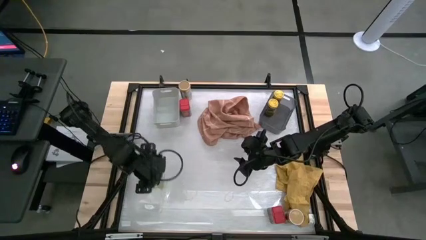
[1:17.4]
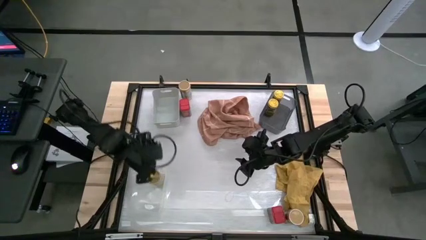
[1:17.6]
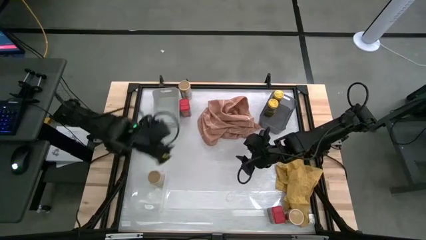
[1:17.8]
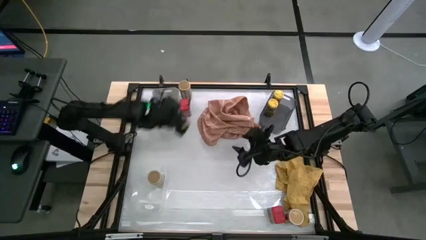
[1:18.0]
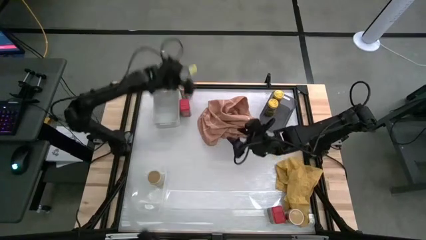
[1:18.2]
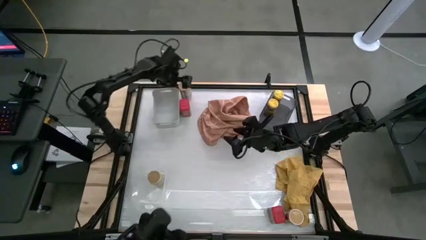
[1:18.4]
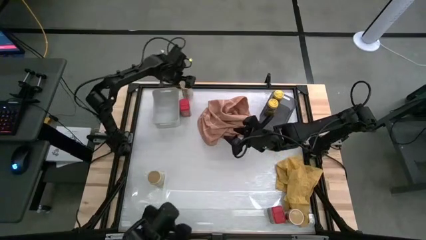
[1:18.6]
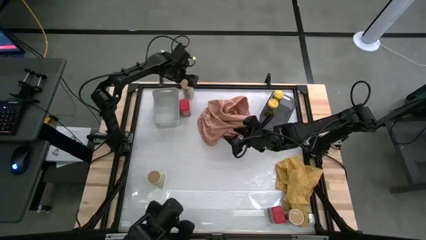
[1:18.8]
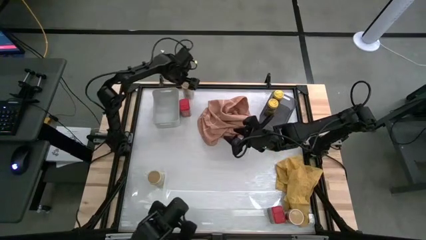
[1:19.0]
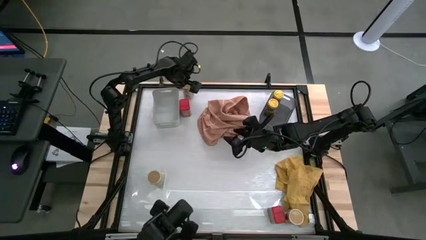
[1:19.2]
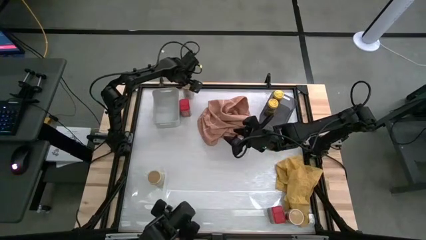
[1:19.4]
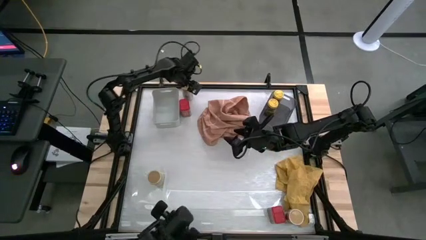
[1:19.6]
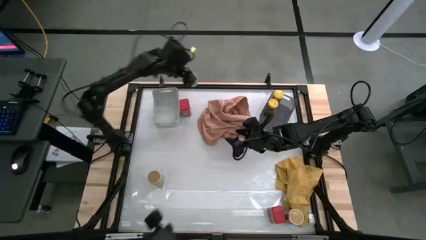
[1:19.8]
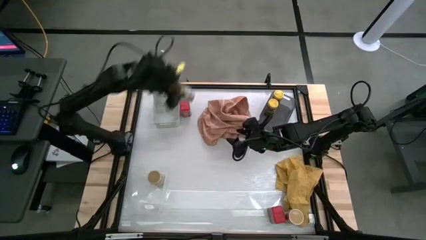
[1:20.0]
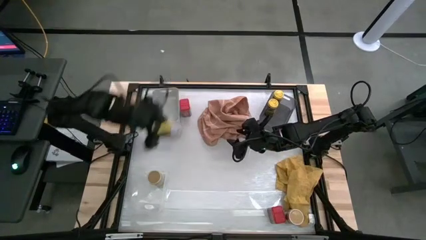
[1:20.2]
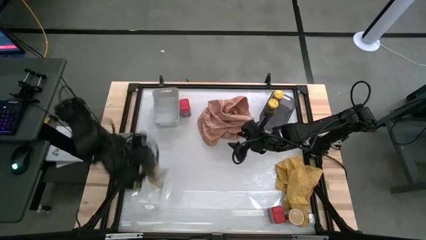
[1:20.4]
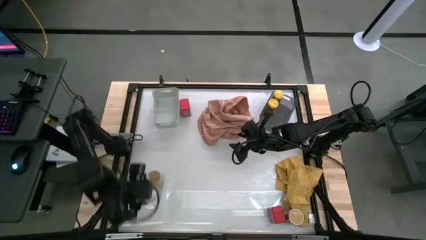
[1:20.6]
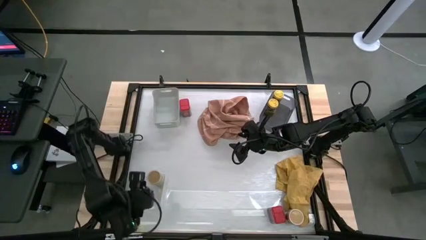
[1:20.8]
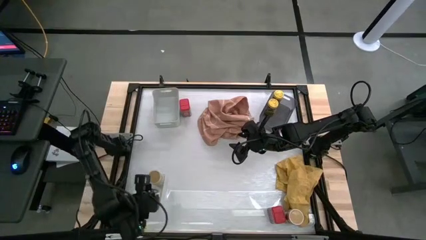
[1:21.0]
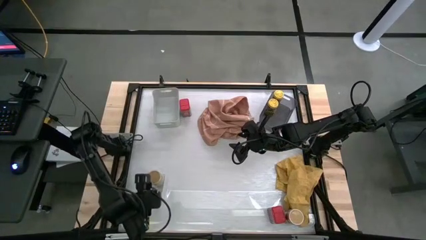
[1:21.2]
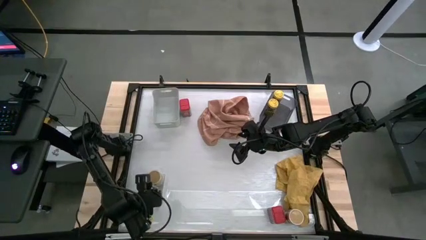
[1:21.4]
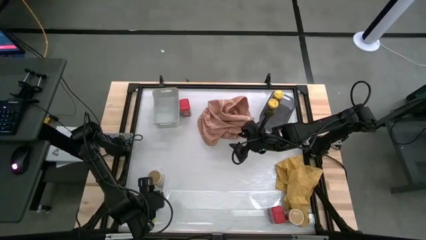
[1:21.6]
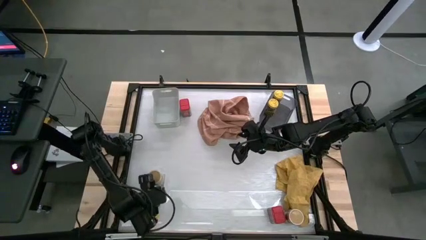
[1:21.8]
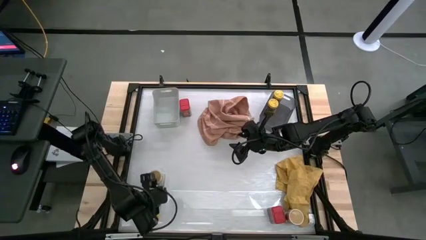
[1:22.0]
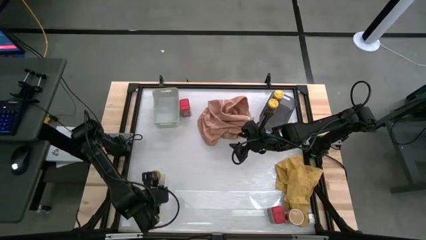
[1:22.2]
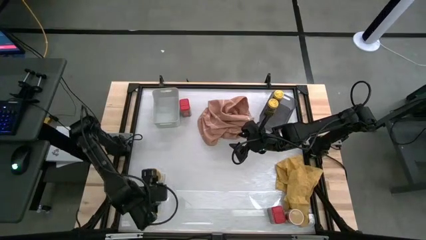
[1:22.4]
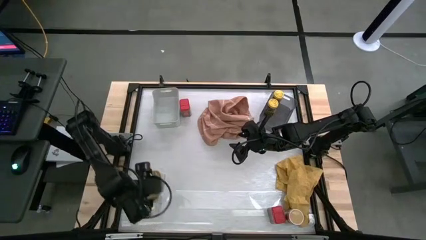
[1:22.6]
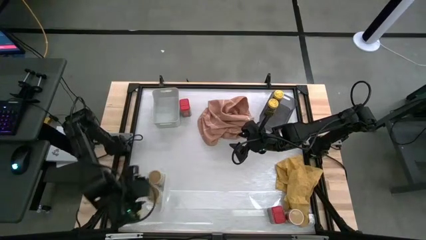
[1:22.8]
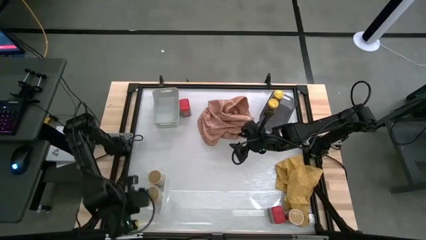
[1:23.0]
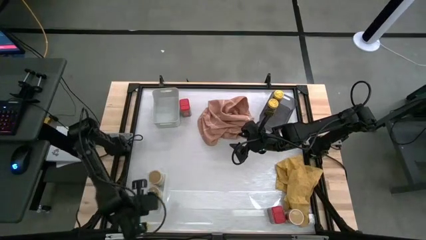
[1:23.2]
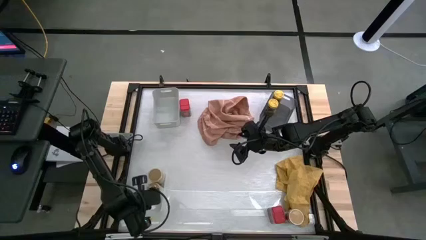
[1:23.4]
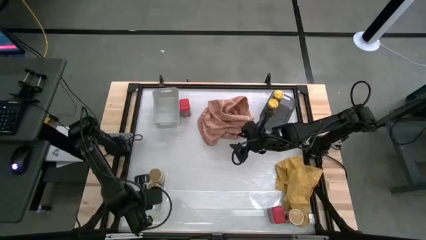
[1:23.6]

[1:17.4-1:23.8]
Task: Sort spices by type
Put the top gold seasoning bottle into the transparent bin

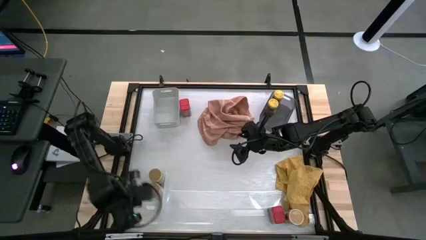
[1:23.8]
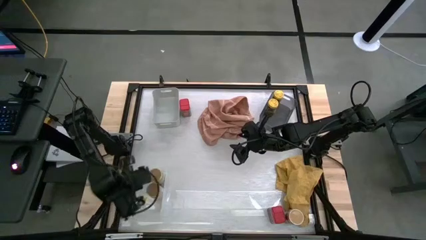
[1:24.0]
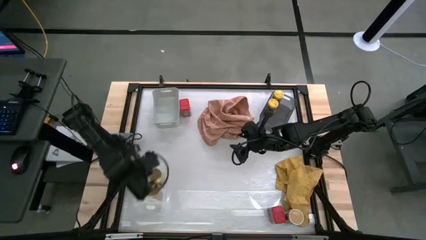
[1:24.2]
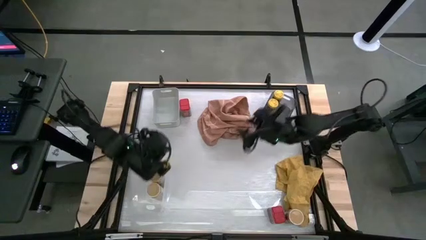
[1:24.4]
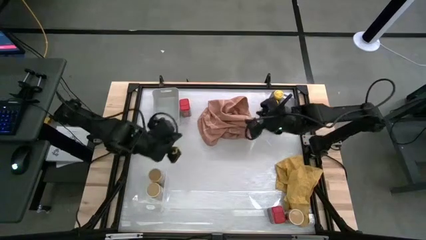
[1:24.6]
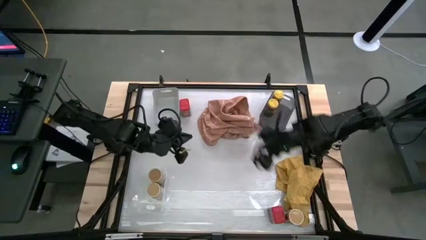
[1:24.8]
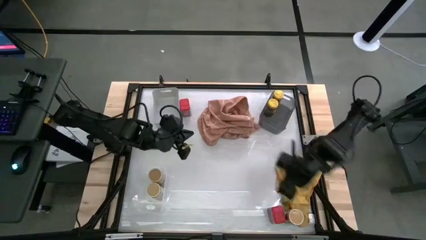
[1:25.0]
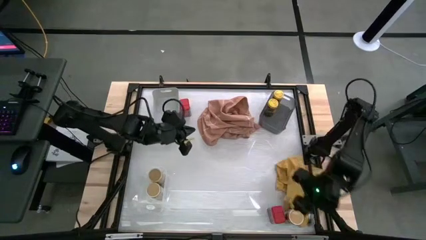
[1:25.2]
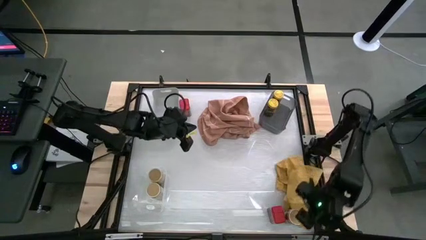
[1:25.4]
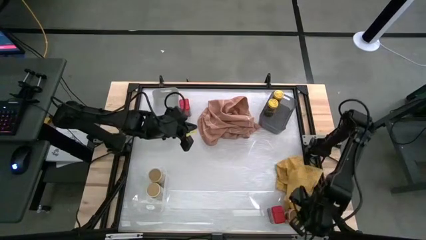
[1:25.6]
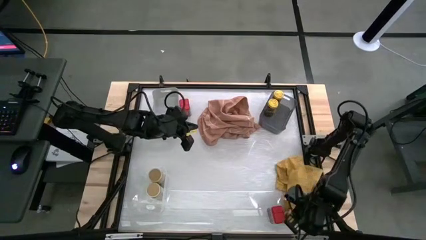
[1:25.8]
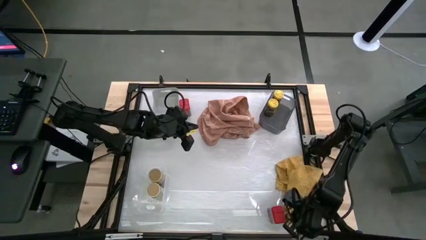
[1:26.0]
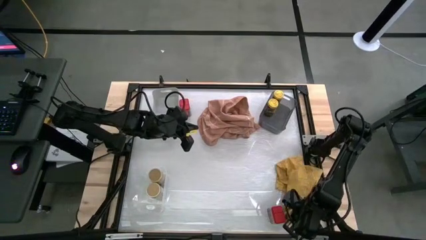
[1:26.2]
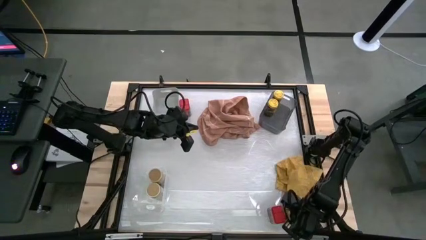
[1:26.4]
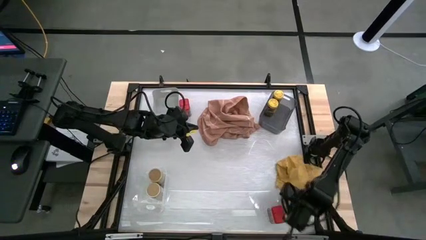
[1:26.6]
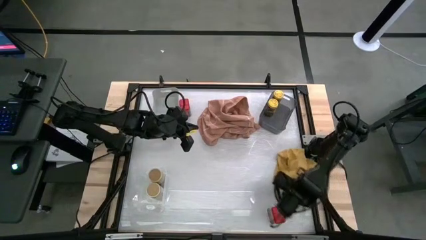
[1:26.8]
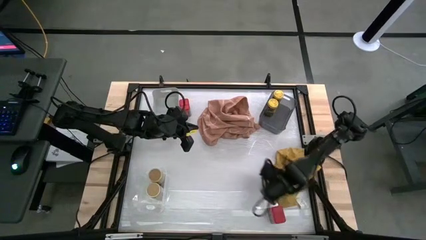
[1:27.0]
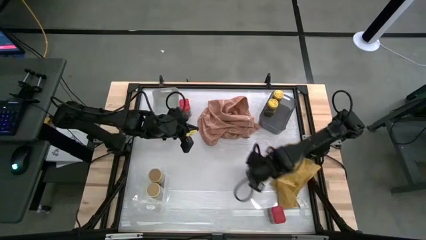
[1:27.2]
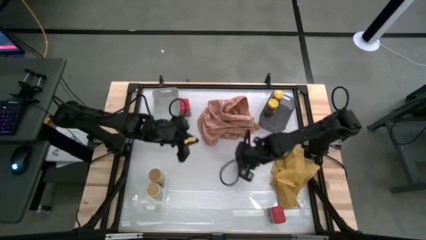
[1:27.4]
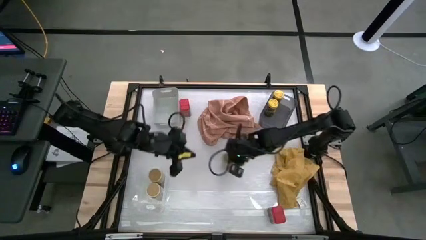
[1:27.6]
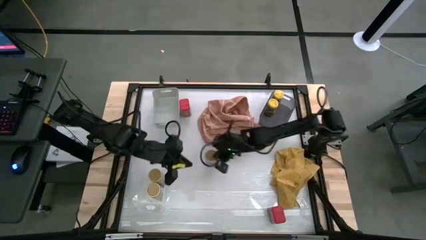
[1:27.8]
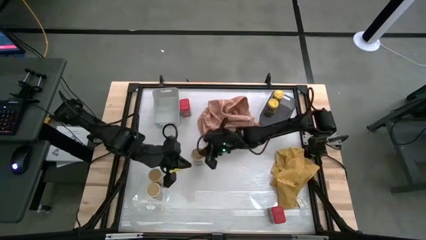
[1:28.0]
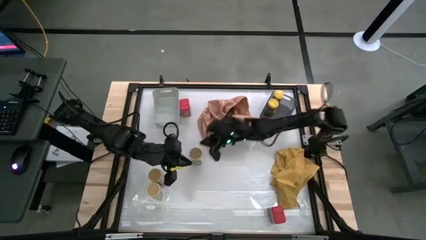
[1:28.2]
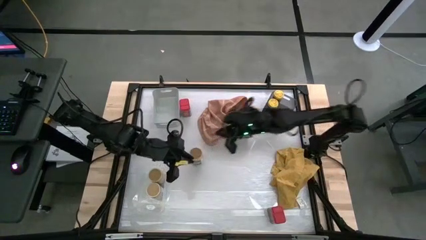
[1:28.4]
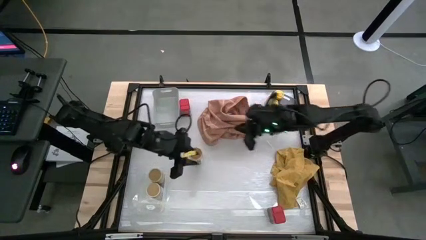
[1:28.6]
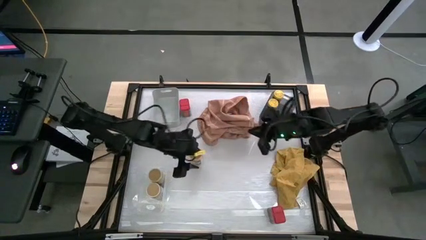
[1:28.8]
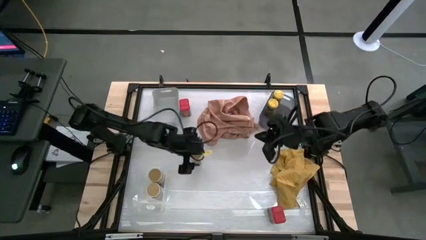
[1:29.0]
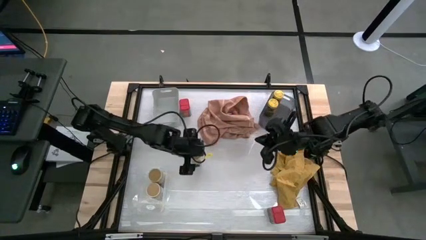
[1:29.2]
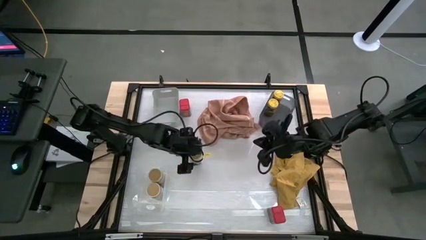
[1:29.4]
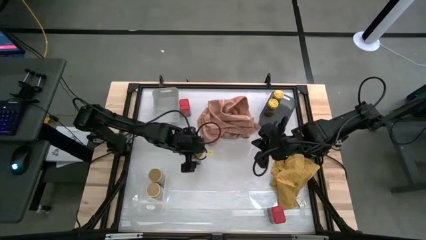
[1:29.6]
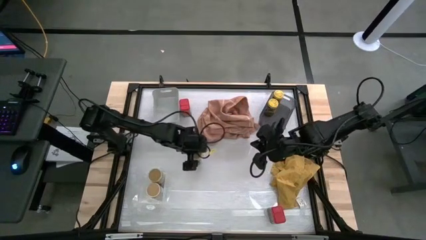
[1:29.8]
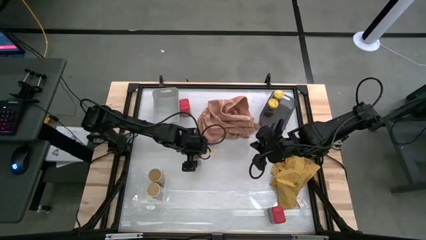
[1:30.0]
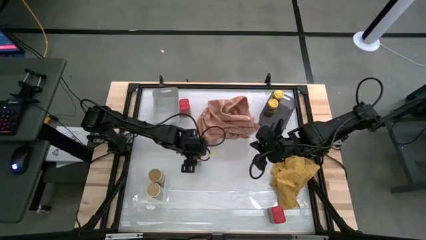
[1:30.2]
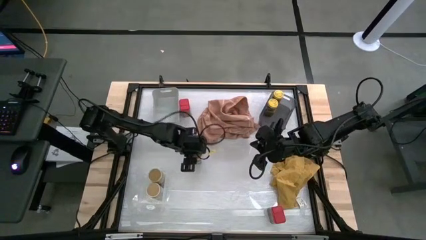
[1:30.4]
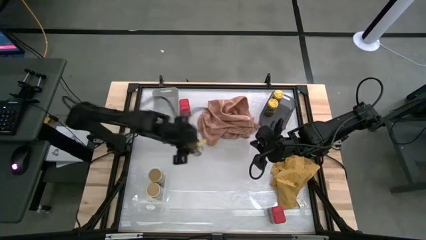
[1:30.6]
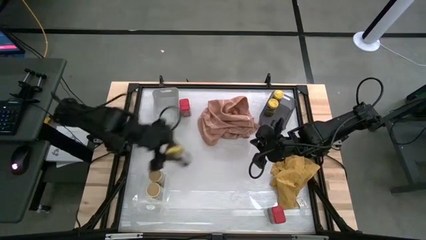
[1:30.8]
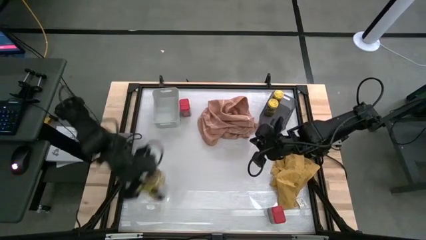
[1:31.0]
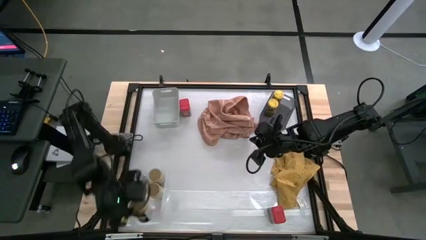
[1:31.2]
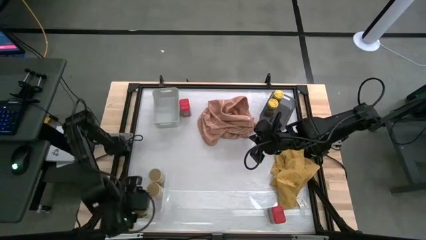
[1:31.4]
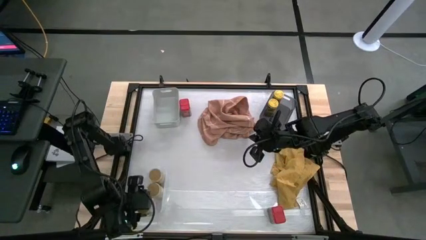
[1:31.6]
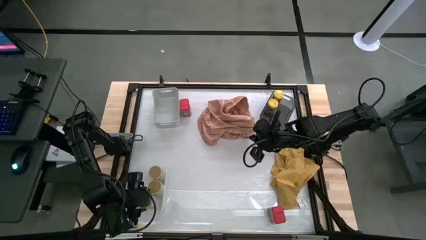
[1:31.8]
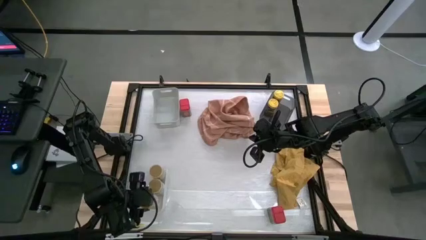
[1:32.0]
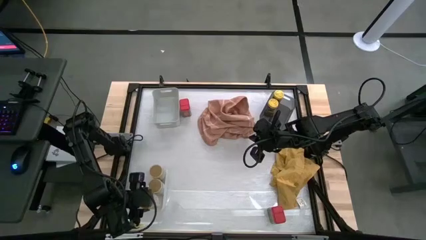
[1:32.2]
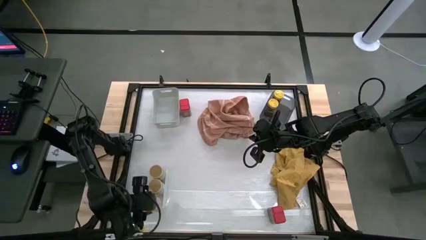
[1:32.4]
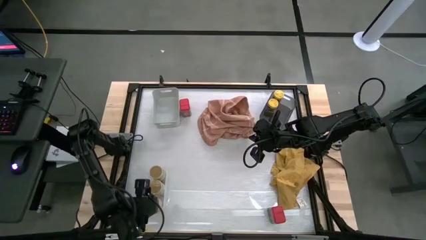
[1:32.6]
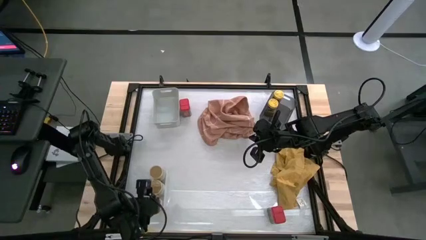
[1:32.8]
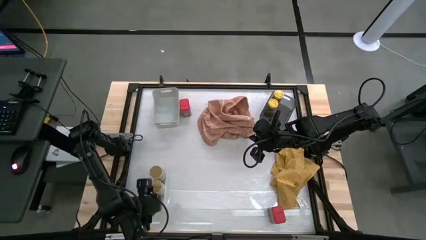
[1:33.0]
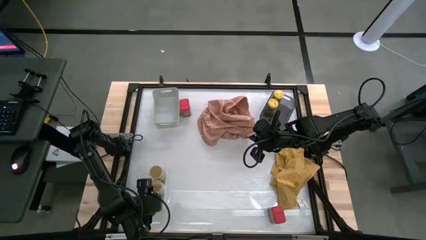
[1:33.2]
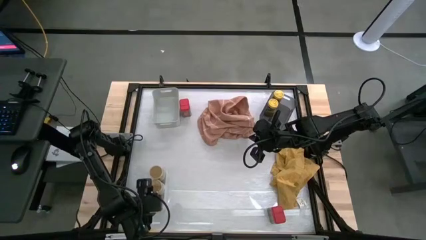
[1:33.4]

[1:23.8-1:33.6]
Put the gold seasoning bottle into the transparent bin
